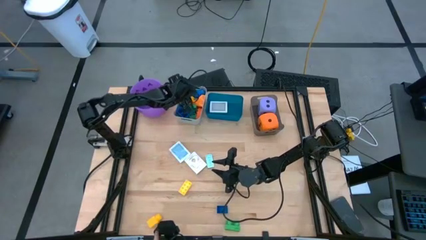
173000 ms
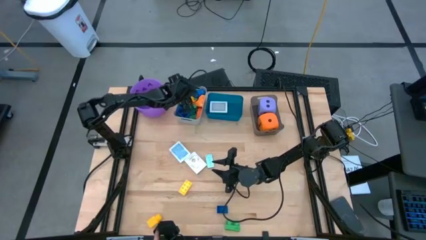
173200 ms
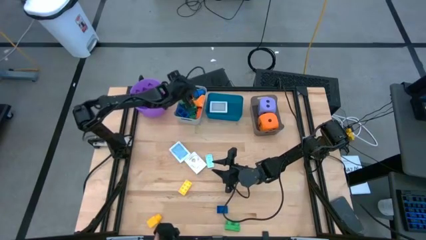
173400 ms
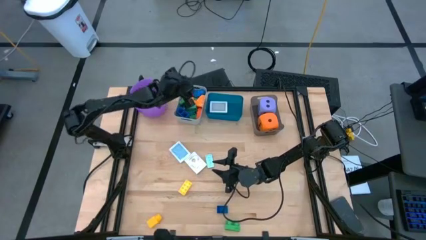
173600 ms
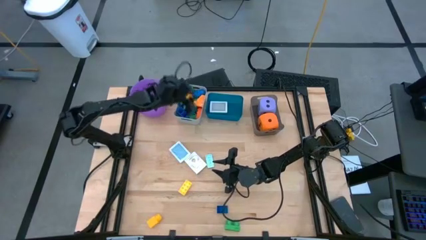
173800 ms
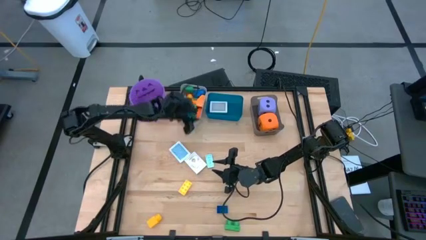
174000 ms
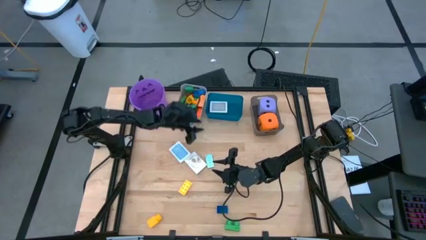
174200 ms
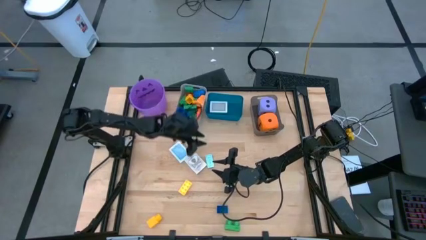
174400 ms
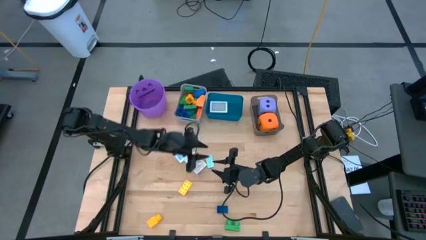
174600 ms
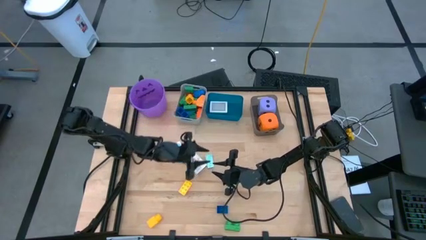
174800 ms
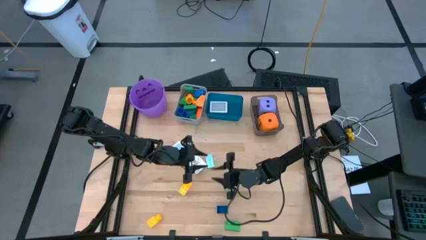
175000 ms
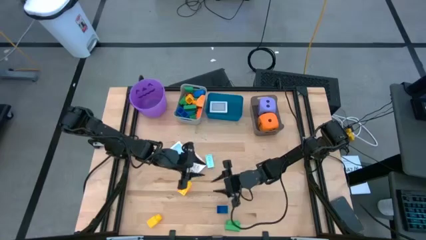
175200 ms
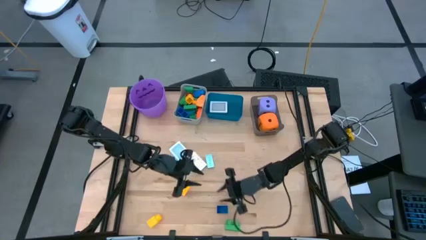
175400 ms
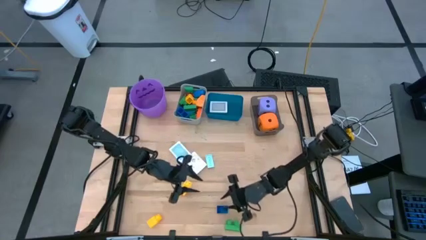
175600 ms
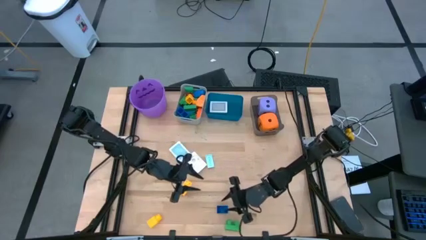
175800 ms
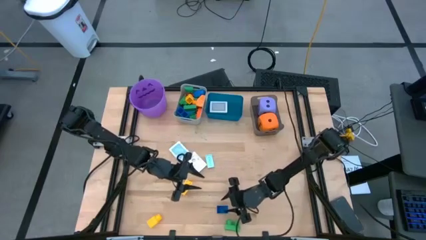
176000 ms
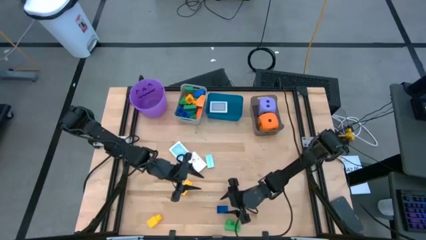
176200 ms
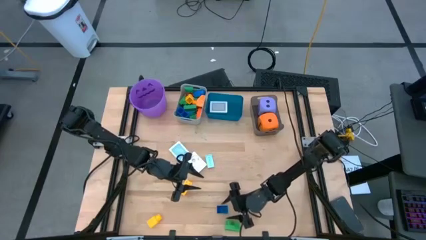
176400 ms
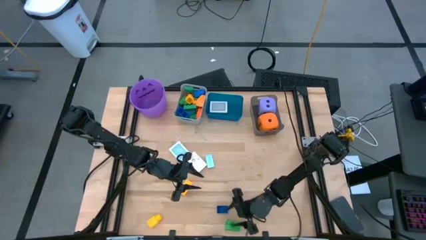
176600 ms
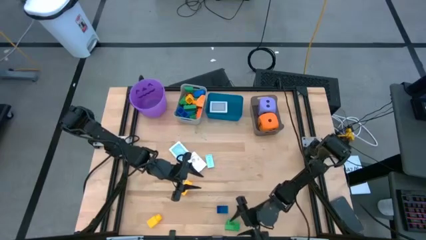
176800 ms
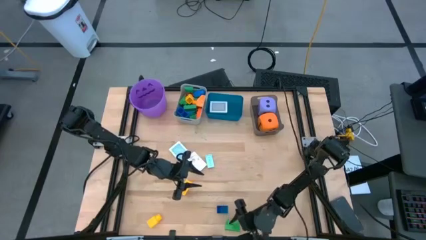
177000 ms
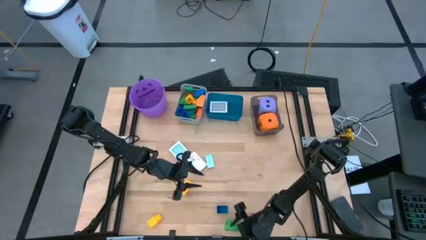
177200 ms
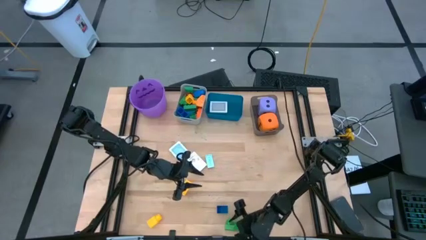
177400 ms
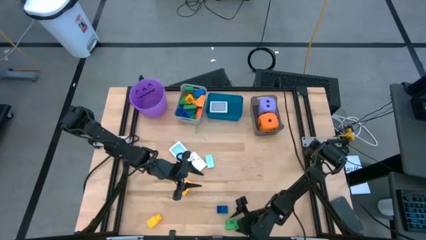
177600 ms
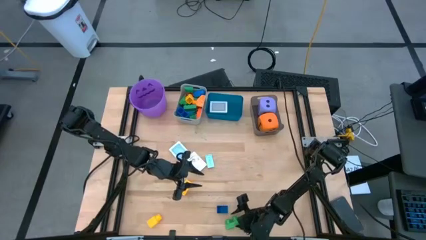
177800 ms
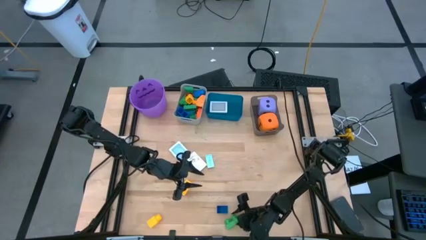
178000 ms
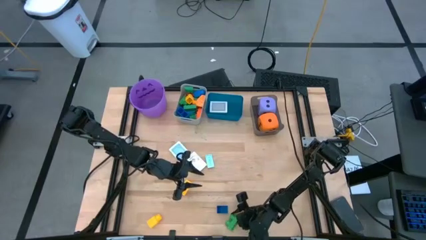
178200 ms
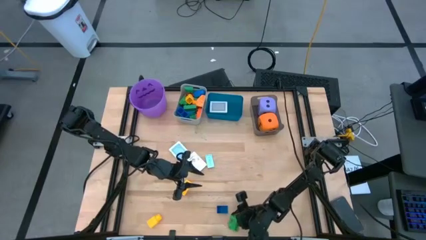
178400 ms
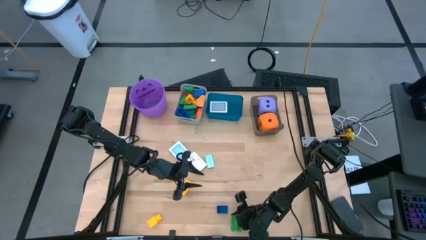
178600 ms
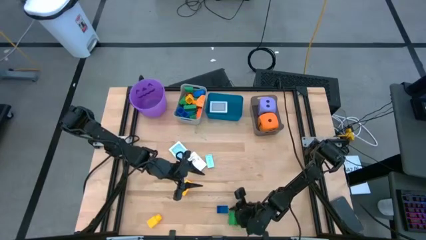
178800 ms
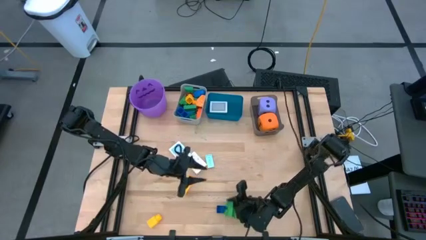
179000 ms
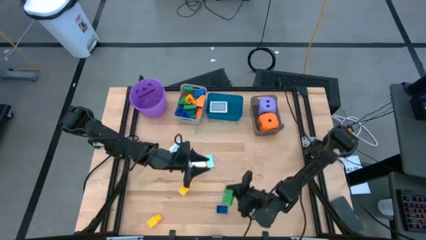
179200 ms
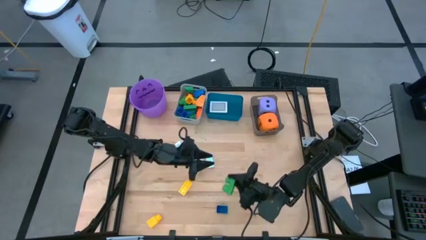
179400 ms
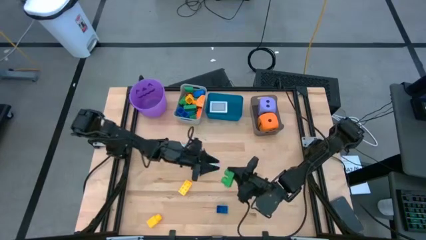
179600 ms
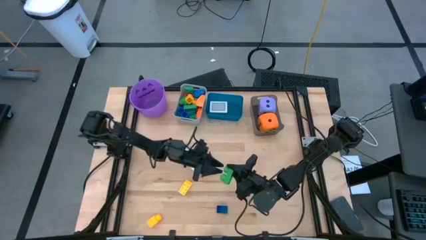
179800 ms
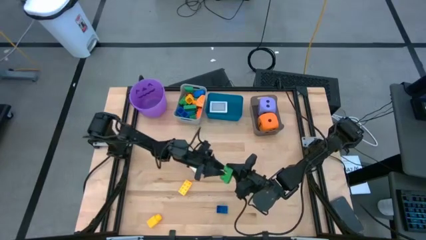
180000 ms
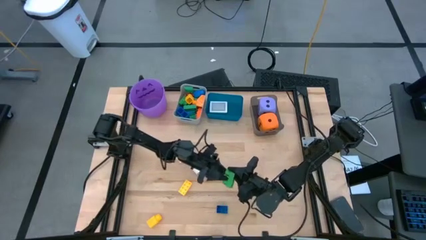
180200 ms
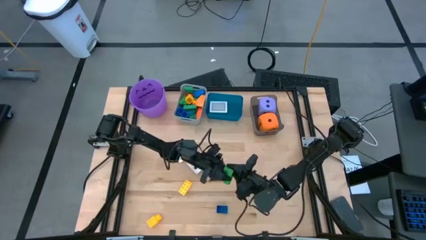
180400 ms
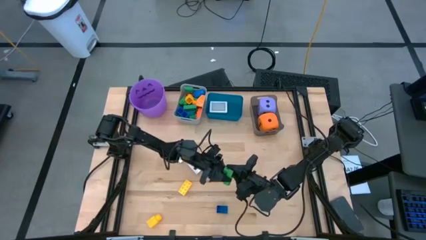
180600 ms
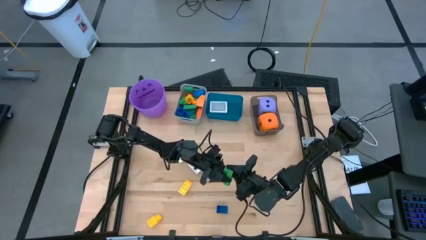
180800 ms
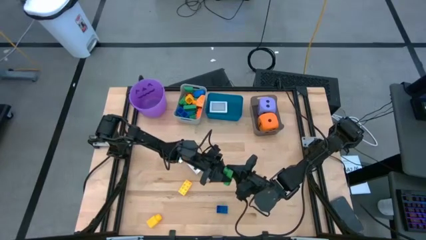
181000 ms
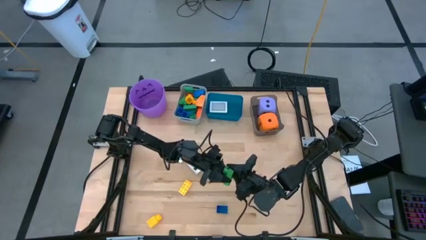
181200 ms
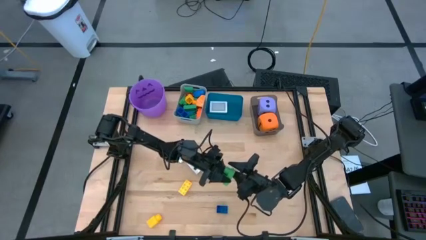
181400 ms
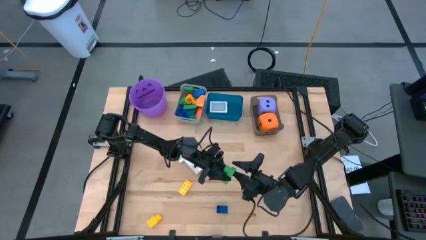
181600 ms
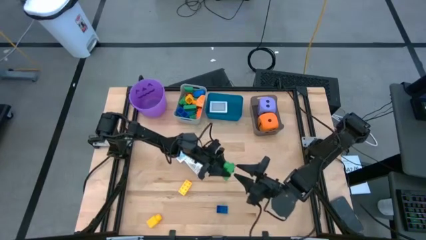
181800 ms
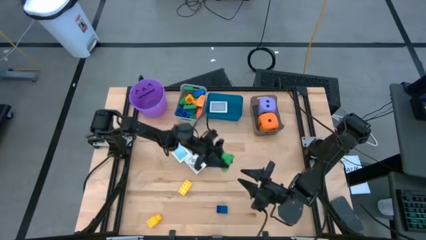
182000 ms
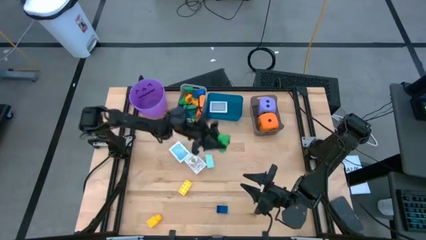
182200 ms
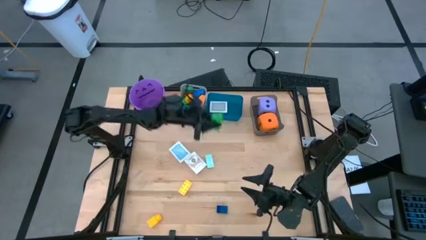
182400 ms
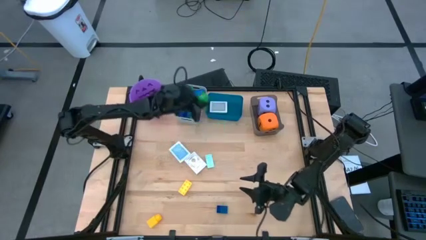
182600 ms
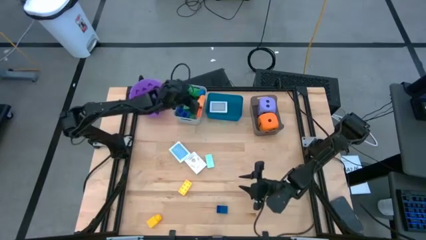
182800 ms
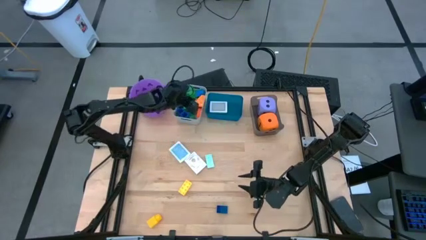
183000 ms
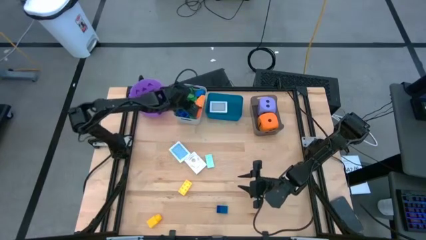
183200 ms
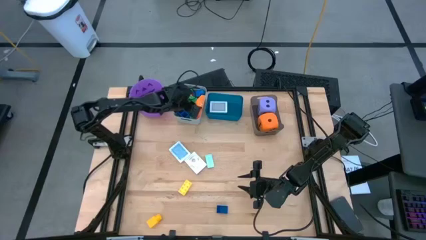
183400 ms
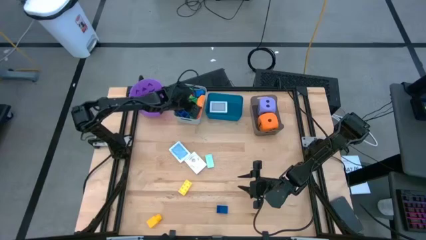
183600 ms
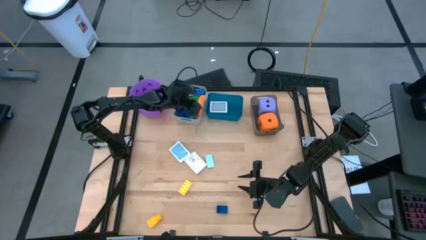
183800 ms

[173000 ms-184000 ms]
Task: Pick & Place Toys
Put the green game piece into the gray bin

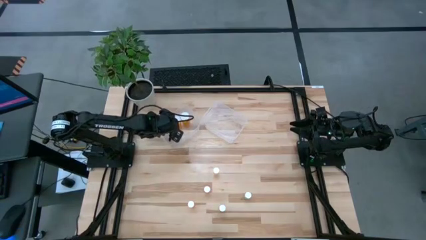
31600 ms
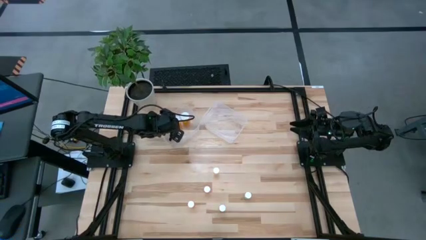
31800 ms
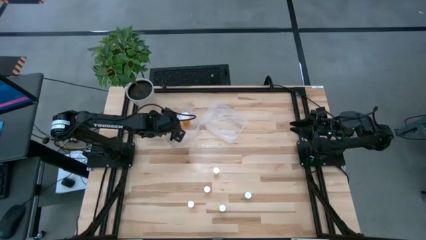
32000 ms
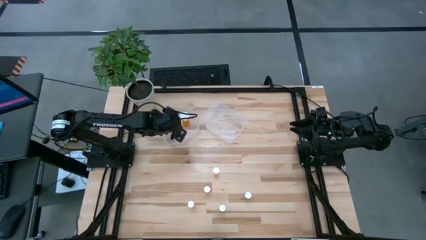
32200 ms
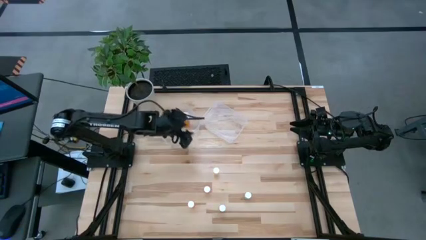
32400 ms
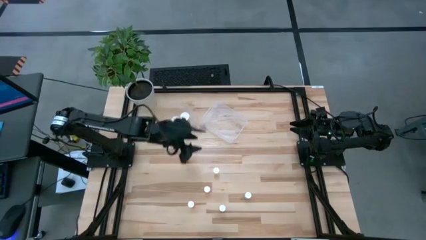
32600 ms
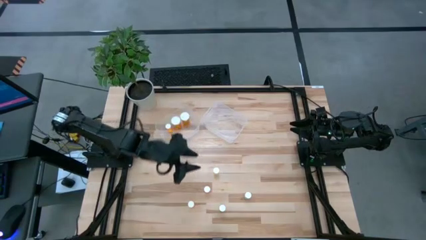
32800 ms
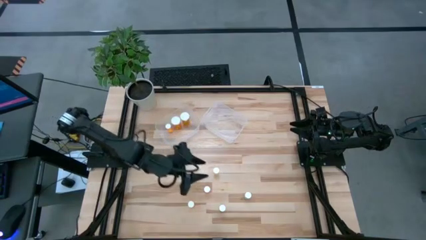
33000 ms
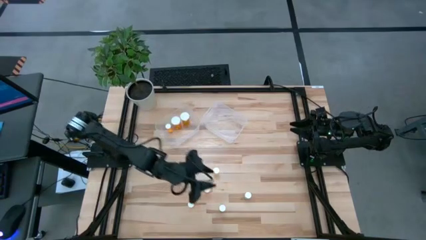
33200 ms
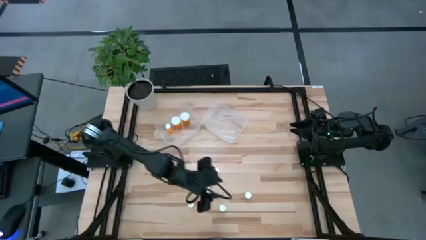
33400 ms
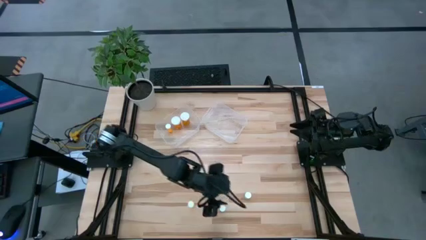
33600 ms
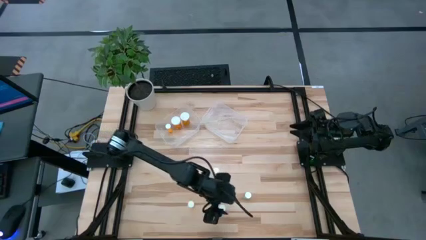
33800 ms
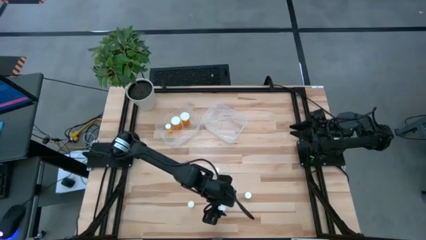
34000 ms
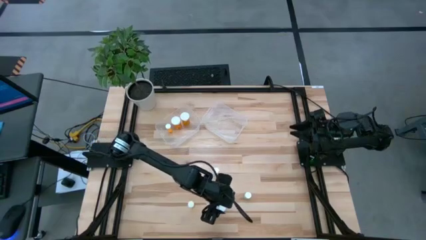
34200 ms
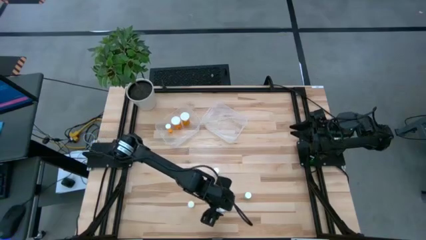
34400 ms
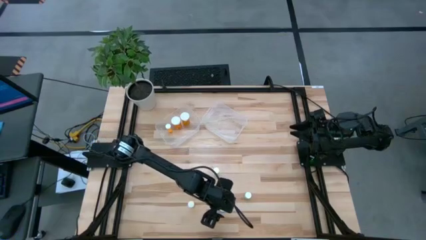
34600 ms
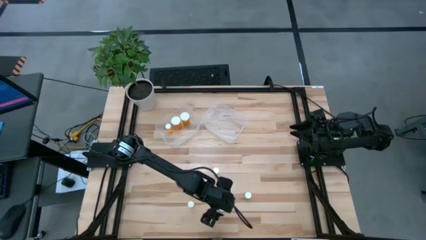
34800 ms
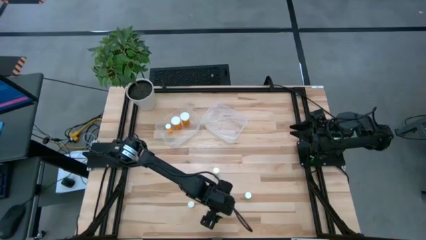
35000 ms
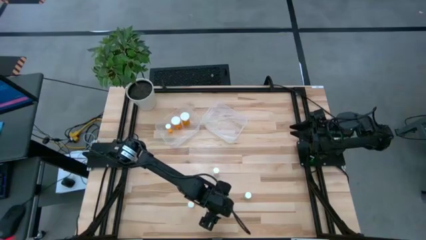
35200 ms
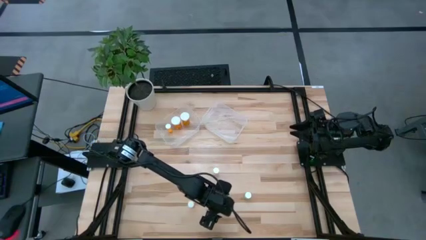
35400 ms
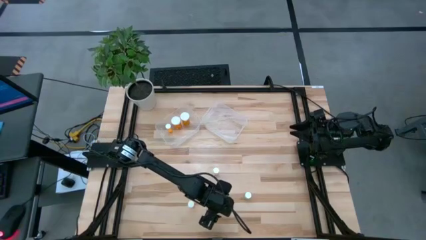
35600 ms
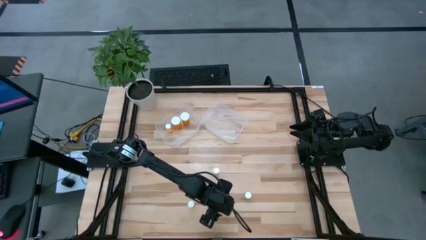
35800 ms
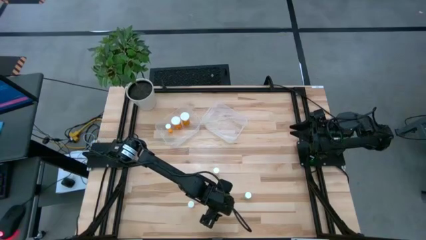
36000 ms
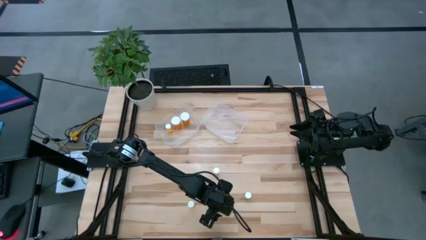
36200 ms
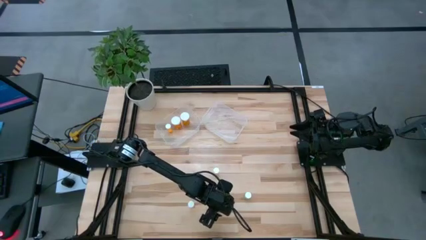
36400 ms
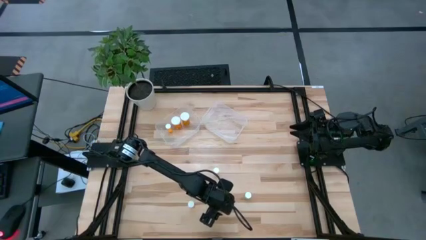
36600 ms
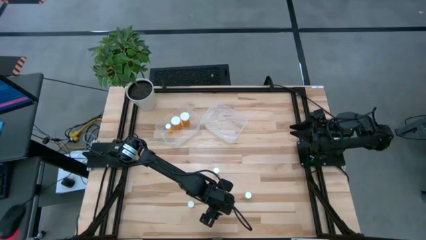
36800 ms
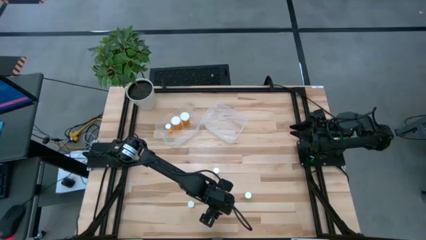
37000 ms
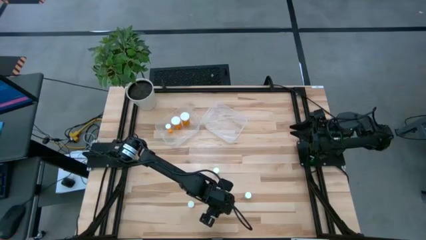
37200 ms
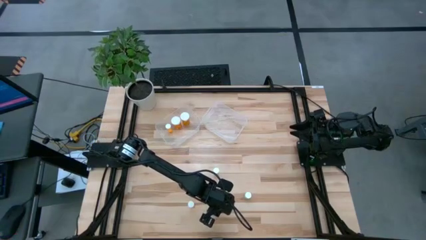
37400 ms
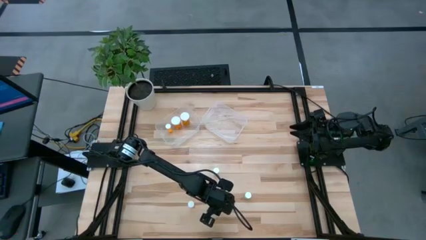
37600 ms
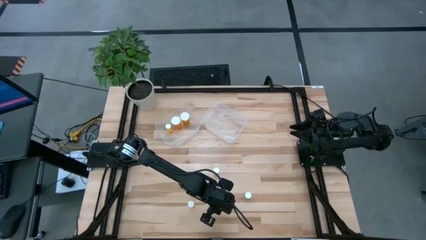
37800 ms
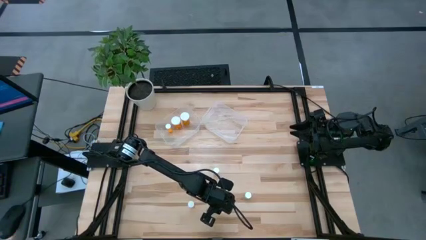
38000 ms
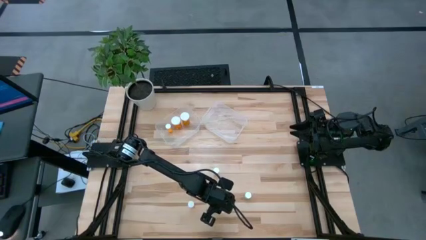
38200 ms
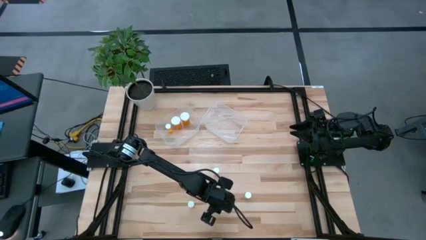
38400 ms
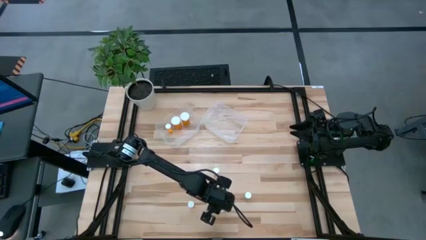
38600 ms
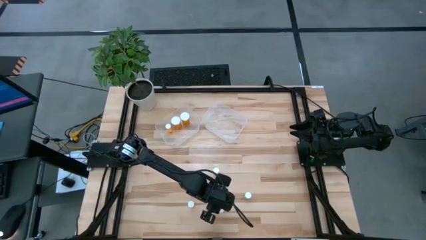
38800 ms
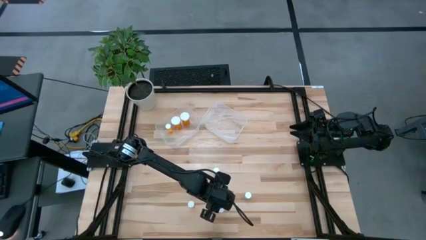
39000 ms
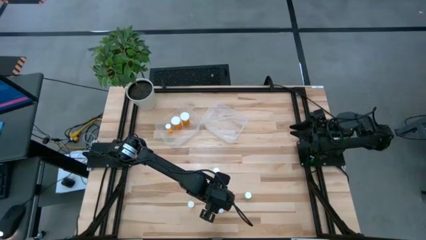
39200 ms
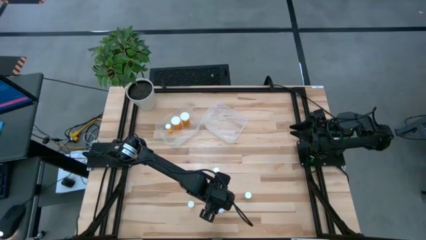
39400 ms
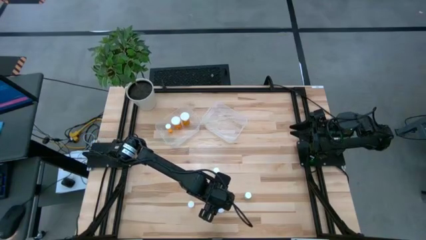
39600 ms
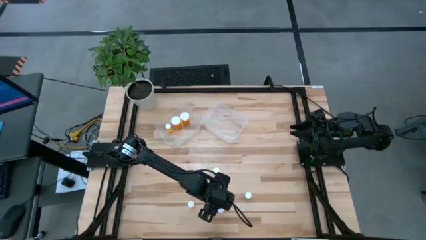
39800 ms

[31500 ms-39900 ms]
Task: Pick and place medicine bottles into bin by pill shape (circle, oval)
Put the small blue capsule bottle into the left transparent bin
